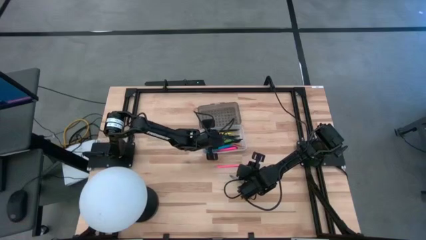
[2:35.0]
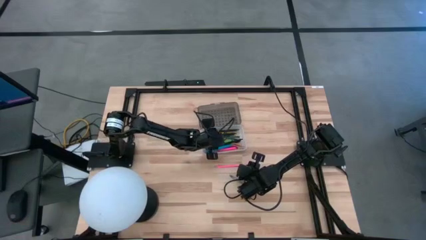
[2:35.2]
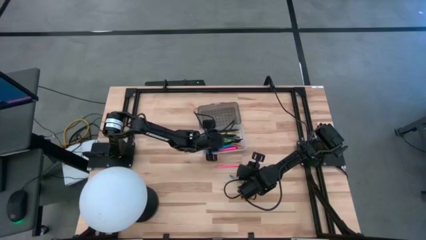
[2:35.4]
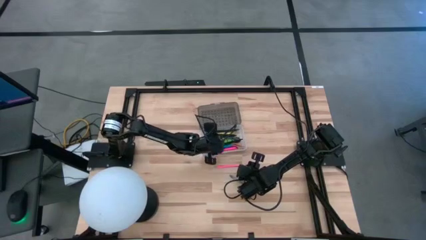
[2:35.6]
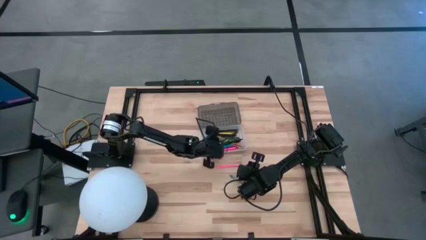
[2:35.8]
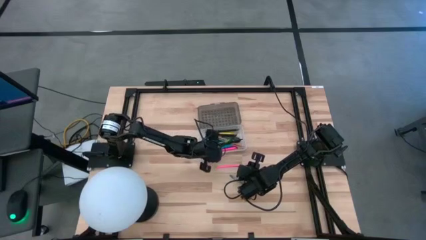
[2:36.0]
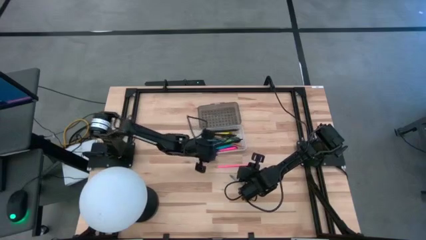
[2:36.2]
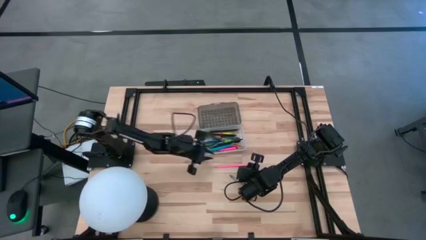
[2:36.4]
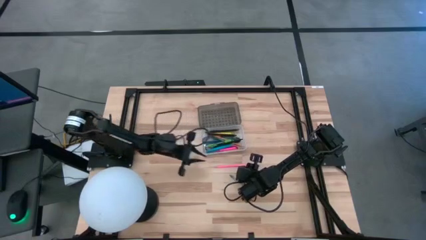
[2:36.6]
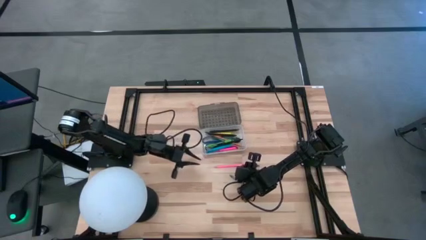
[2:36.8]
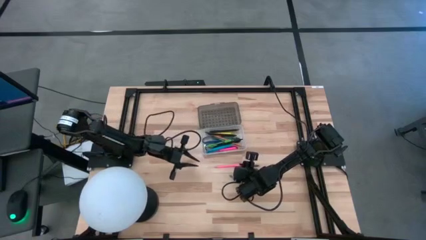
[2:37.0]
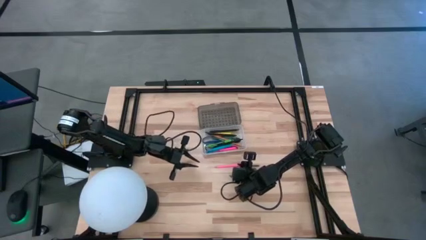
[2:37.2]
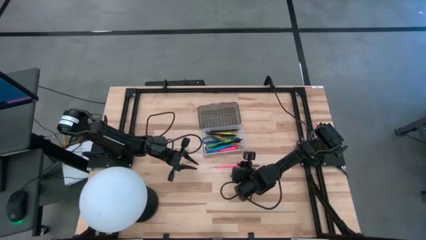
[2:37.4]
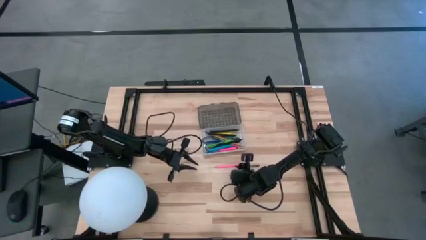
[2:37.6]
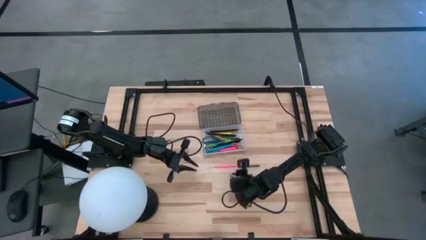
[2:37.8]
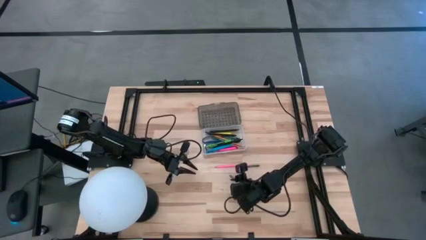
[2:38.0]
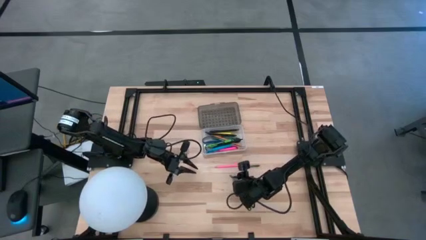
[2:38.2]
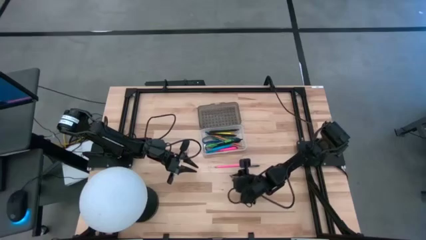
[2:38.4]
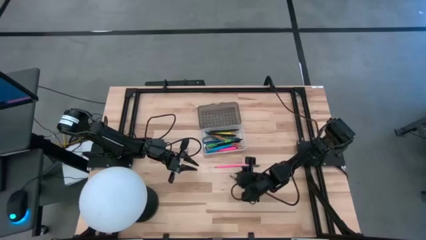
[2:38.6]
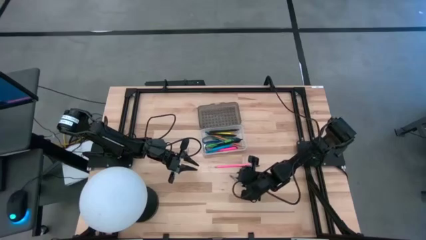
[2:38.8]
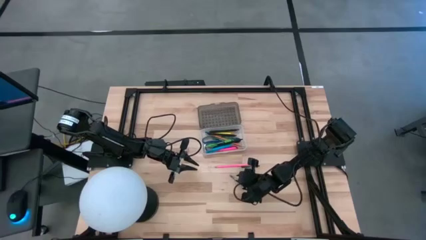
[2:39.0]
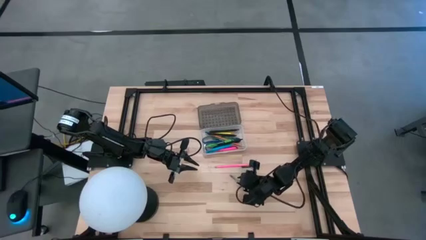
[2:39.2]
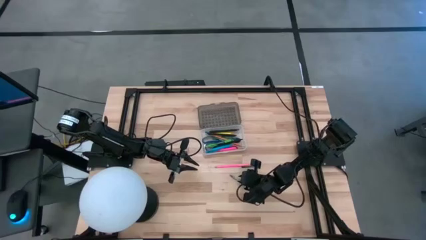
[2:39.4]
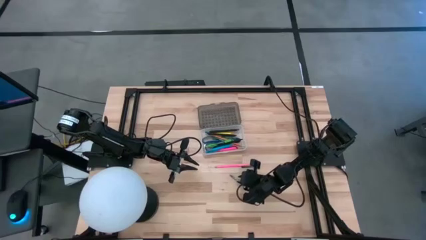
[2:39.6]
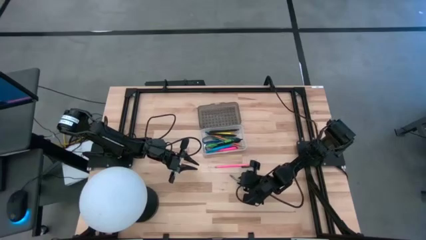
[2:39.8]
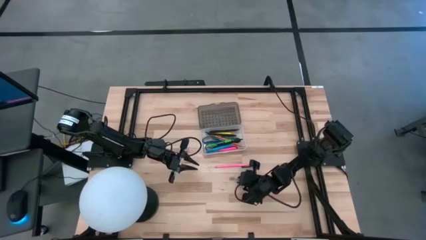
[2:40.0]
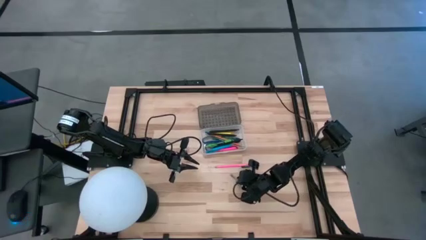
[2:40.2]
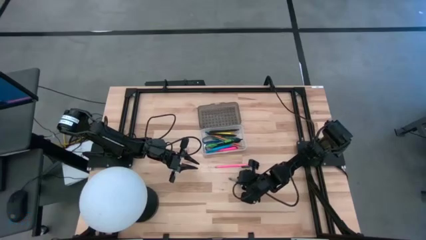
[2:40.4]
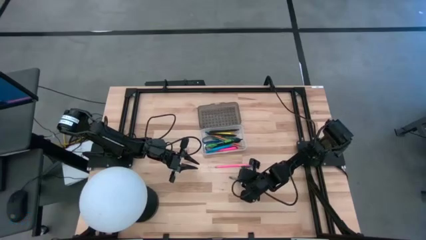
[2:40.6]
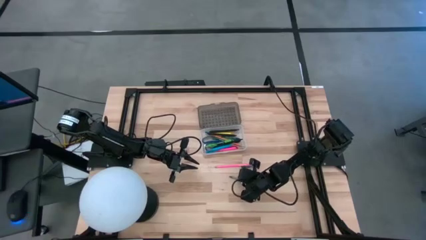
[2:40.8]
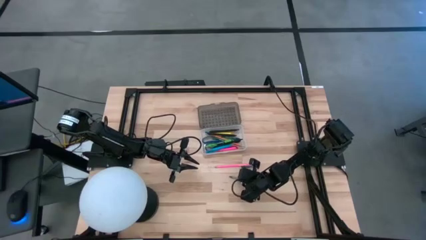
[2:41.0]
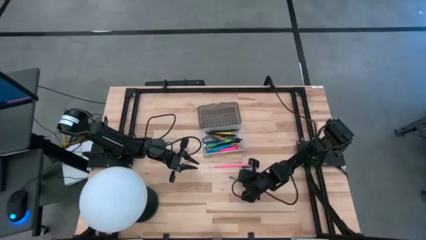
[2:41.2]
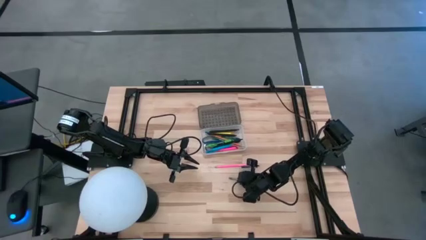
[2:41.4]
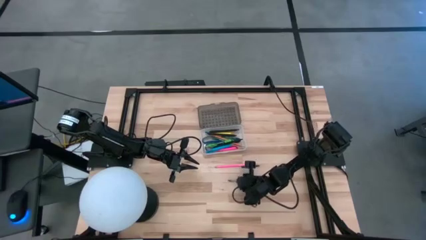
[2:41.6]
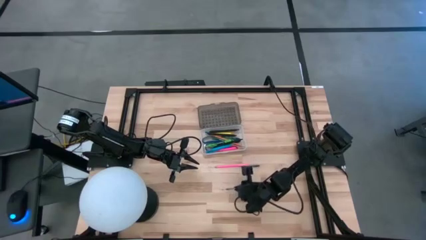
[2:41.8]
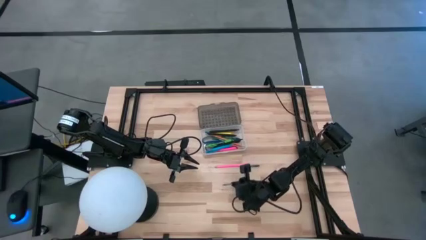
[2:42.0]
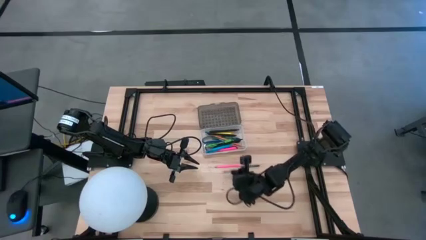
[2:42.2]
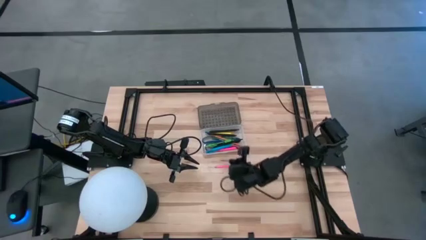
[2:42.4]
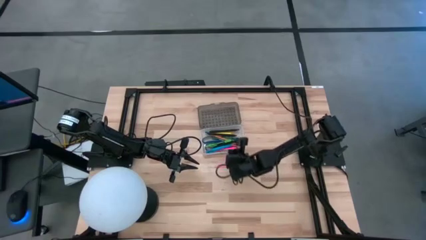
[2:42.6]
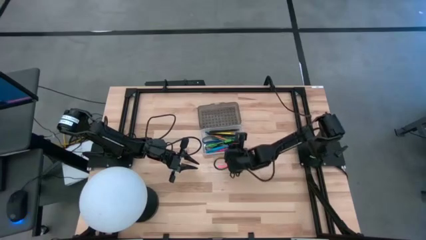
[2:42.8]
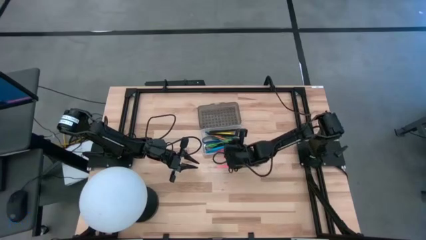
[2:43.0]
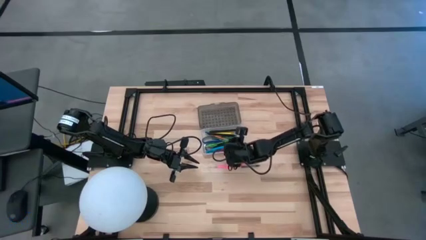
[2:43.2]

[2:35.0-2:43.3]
Task: Pick & place school supplies into a supply box
Put the gray crayon into the supply box

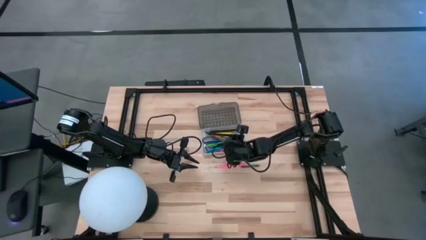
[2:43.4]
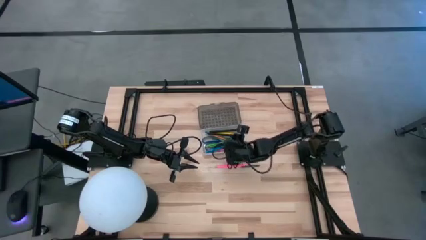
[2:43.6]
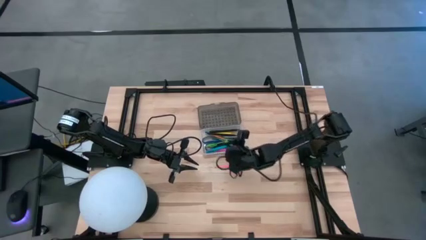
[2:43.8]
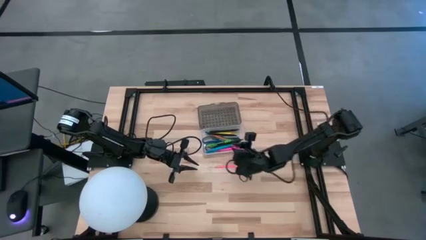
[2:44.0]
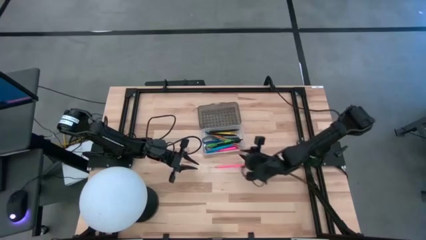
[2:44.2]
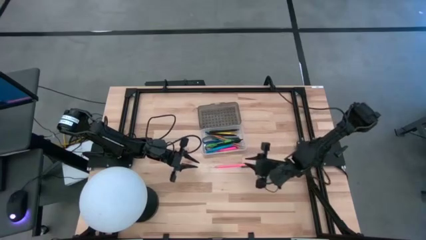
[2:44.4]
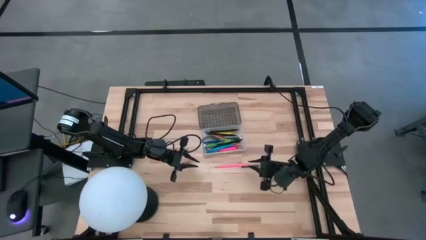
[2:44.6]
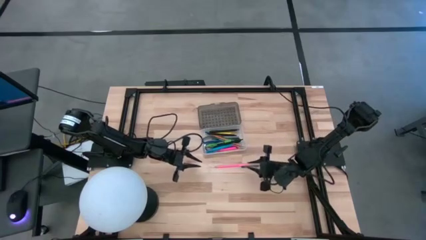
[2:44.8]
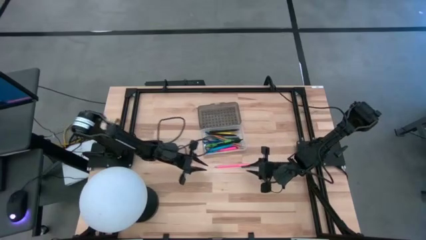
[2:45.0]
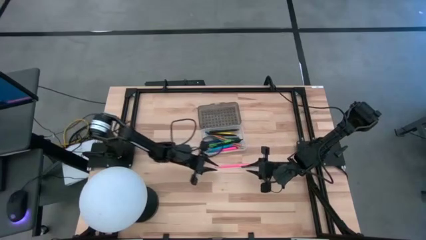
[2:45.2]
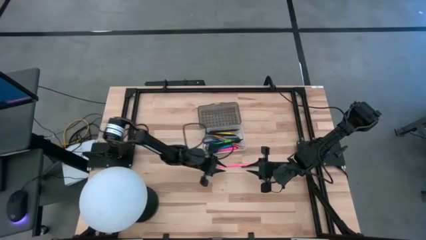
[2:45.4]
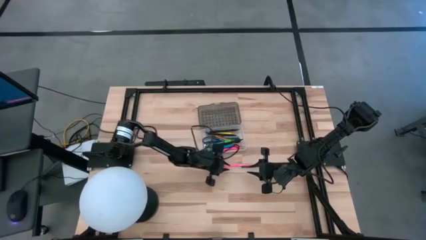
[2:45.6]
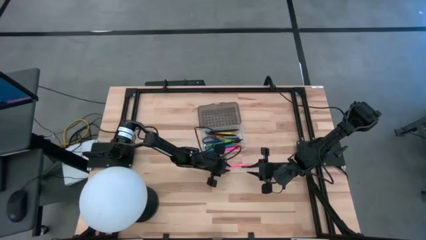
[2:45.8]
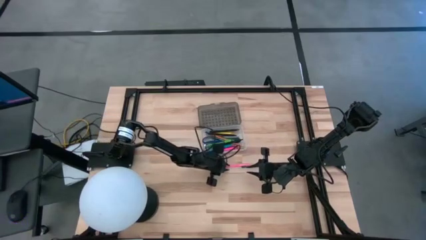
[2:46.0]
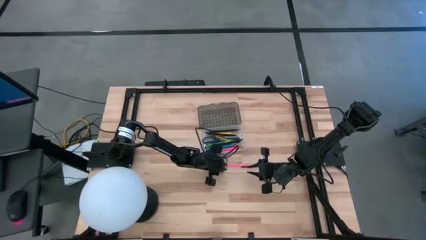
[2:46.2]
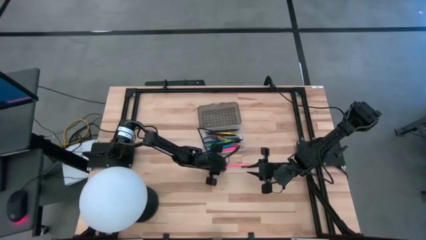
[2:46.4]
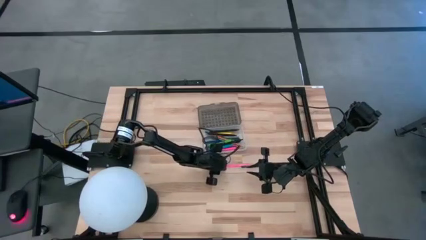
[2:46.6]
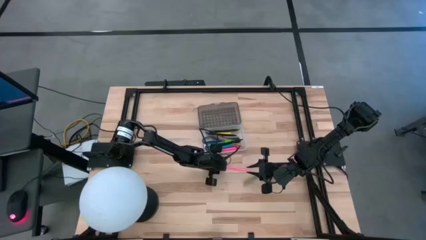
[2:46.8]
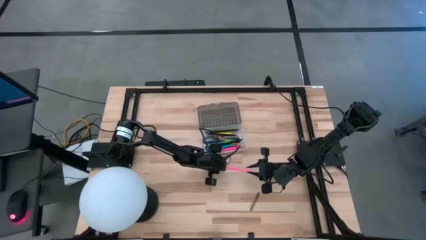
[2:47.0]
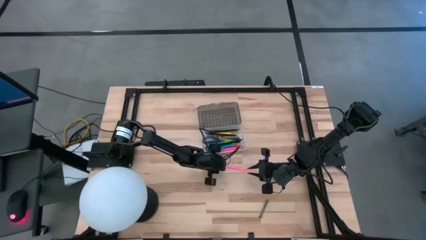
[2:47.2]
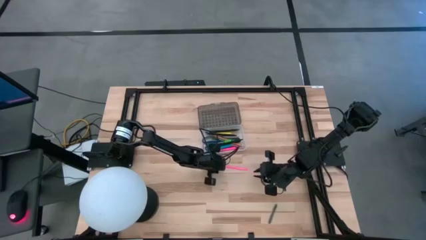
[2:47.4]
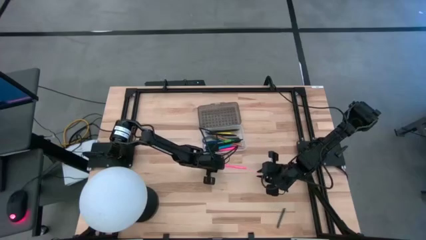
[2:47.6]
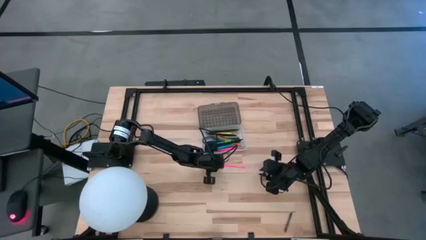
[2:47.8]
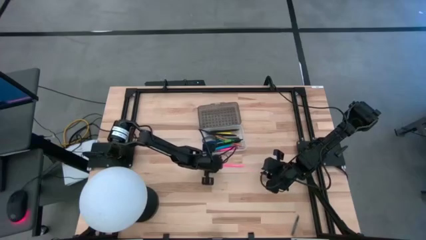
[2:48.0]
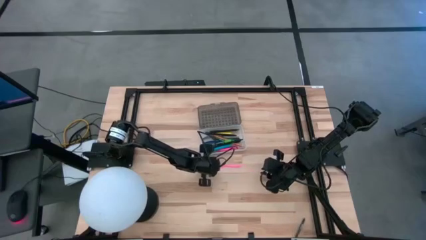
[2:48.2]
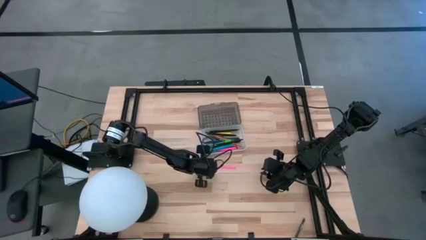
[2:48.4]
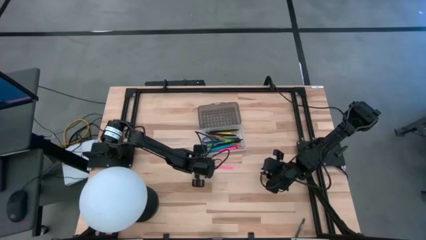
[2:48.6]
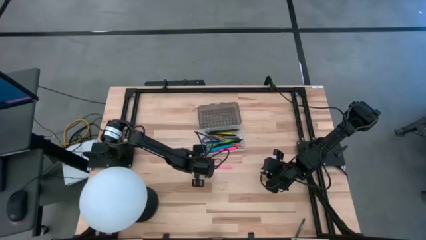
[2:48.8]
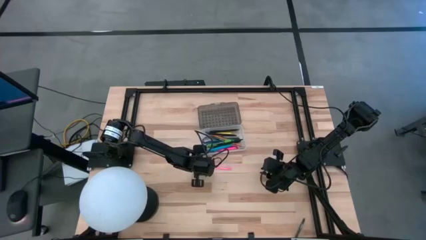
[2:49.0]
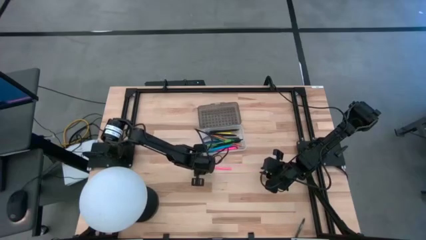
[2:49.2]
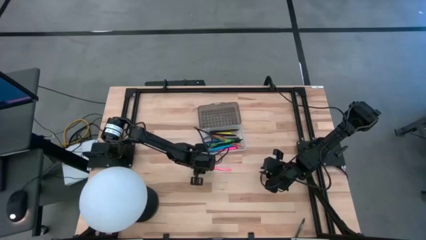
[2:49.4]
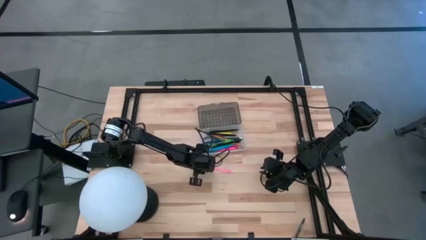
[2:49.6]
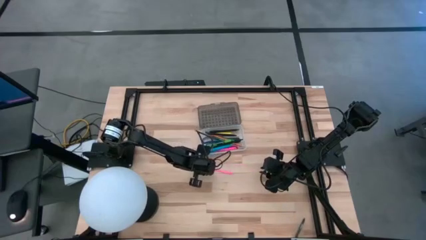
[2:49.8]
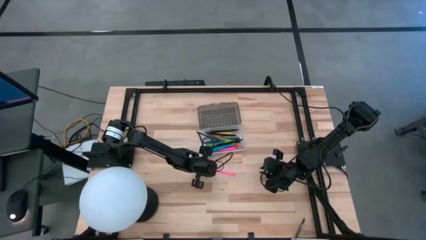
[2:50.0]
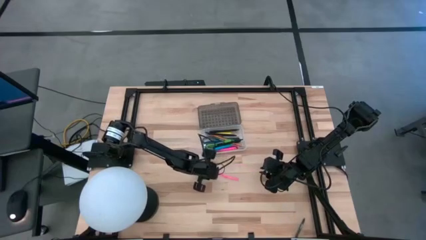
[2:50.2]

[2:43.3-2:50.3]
Put the pink pencil into the supply box

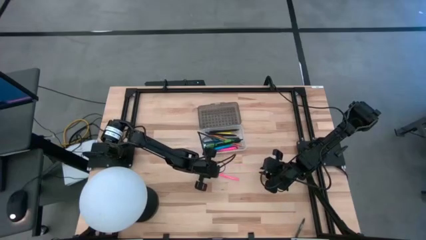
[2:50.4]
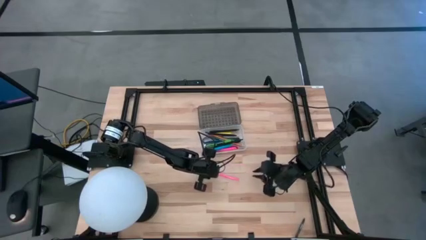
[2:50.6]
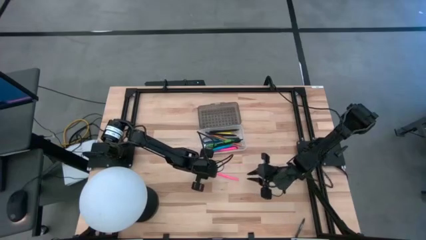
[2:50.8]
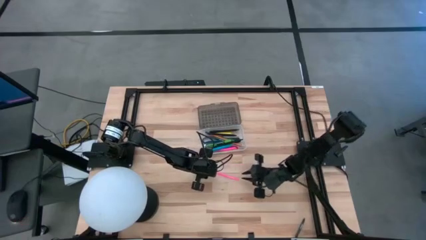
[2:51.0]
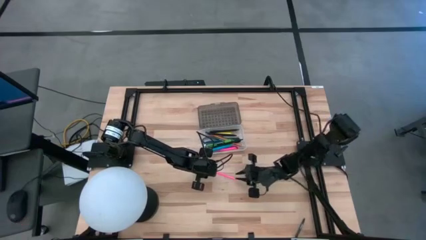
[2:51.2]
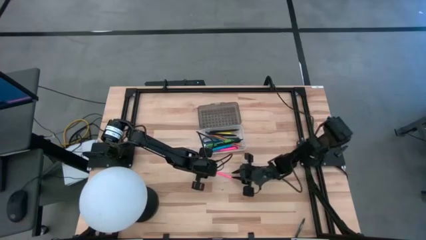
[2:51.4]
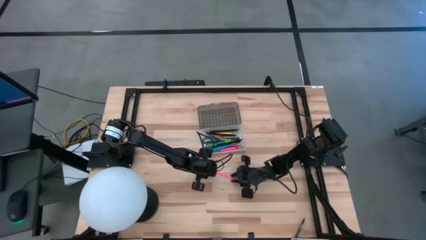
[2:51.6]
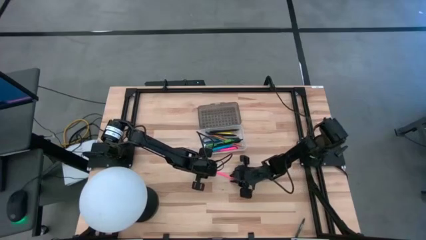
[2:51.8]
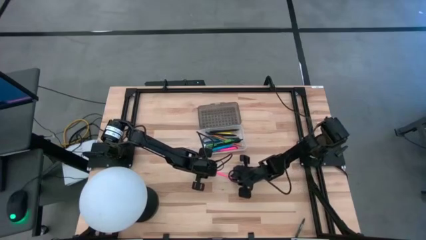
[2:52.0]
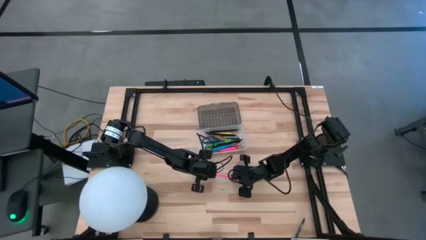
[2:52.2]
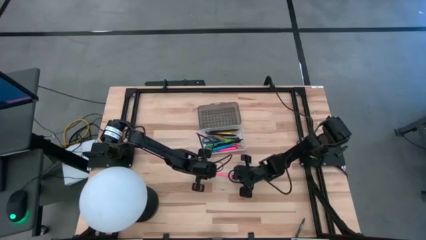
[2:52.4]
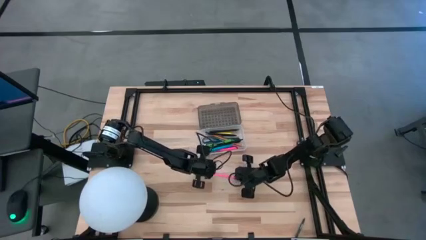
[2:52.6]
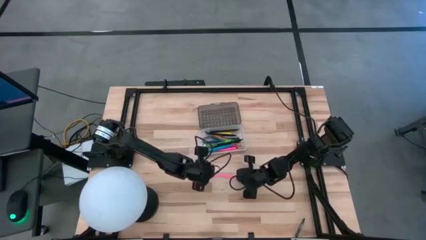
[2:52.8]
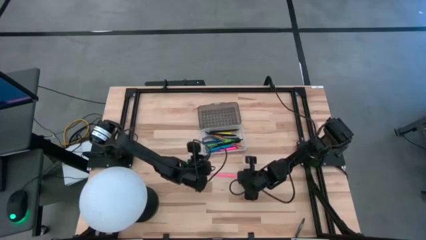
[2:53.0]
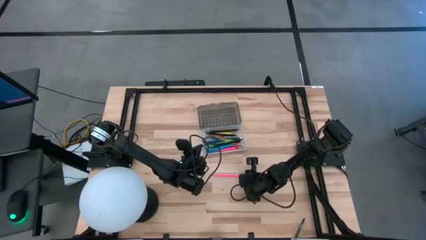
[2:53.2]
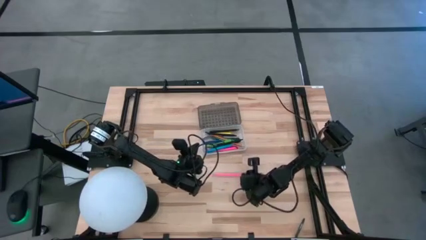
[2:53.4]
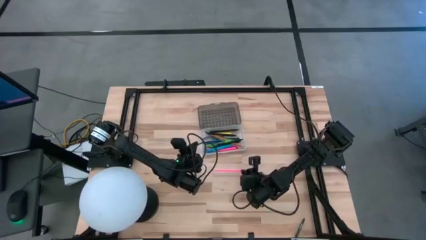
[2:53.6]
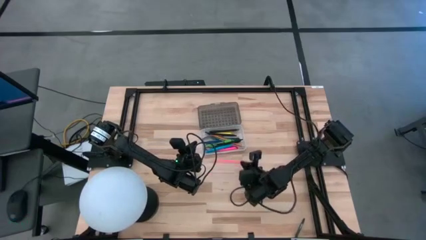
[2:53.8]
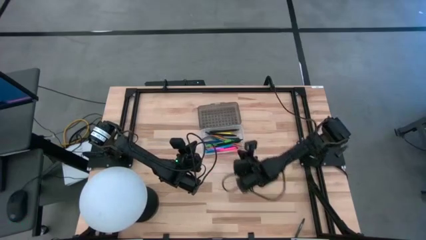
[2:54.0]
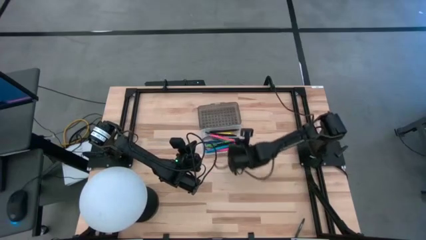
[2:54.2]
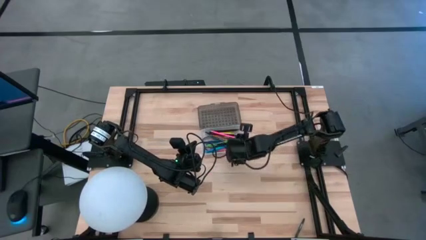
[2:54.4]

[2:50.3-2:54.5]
Put the pink pencil into the supply box
